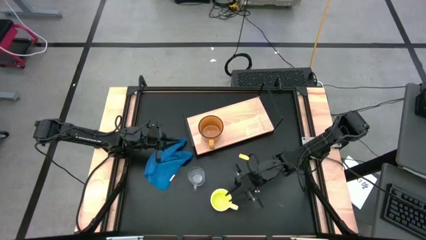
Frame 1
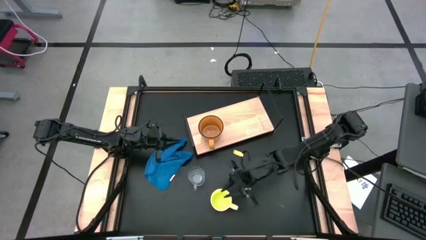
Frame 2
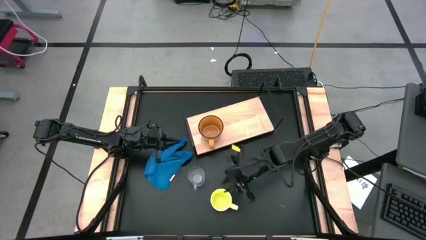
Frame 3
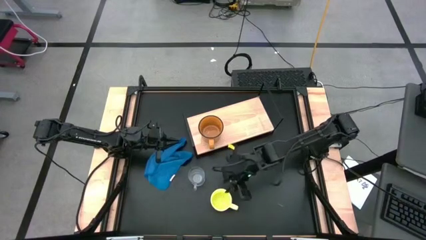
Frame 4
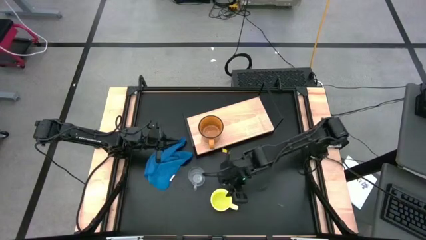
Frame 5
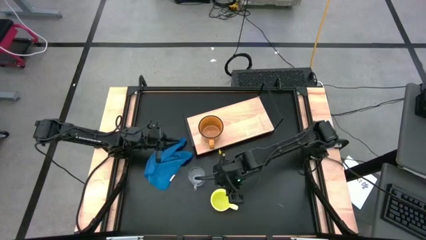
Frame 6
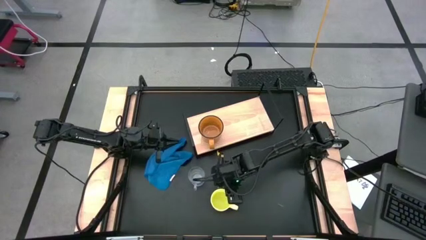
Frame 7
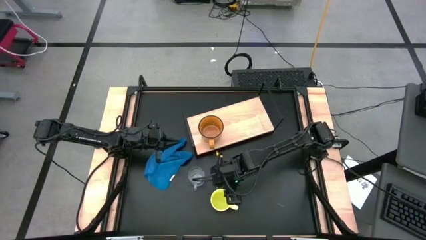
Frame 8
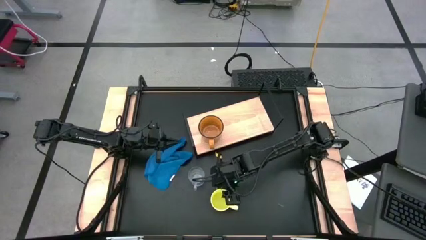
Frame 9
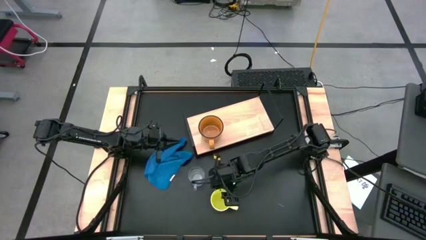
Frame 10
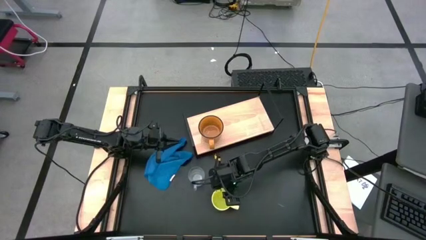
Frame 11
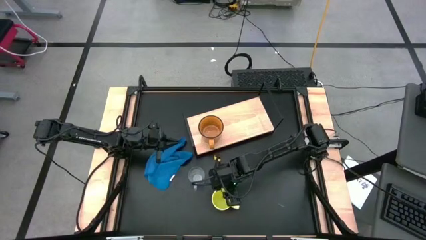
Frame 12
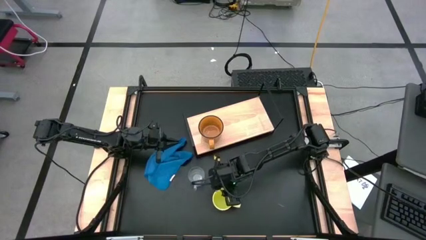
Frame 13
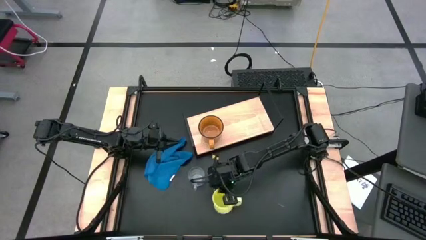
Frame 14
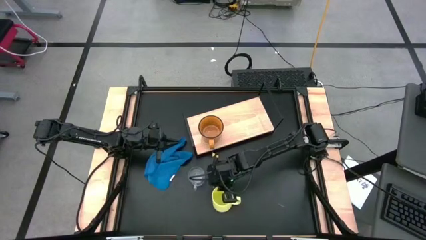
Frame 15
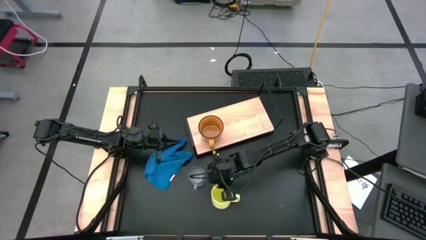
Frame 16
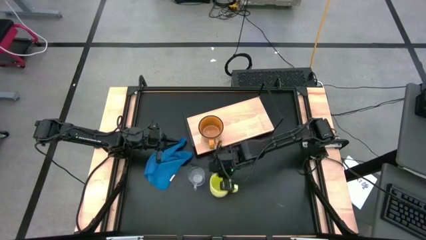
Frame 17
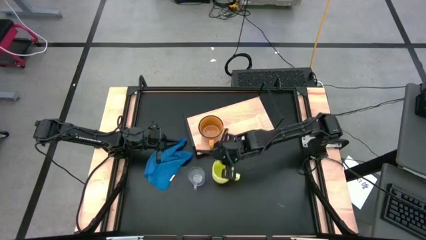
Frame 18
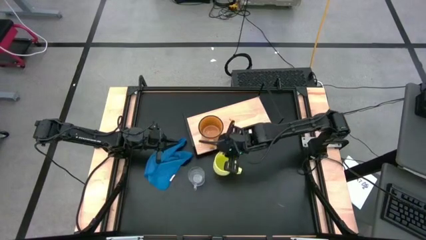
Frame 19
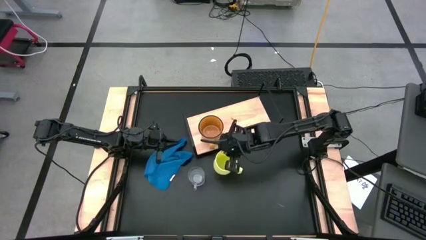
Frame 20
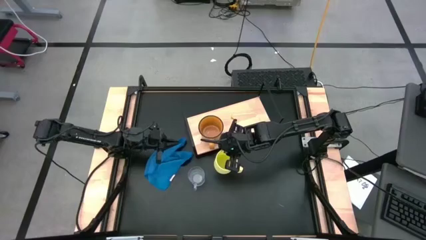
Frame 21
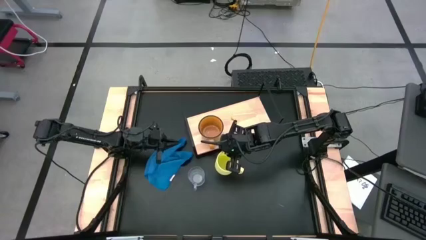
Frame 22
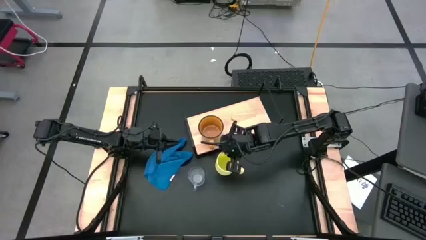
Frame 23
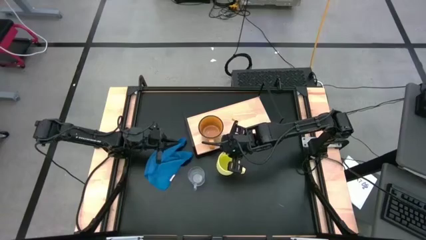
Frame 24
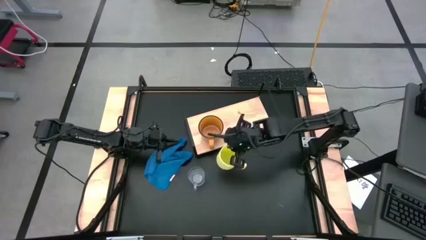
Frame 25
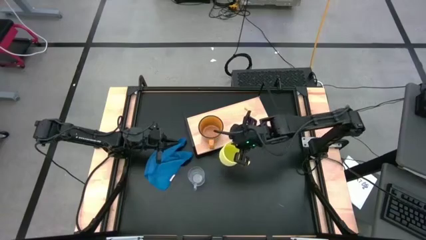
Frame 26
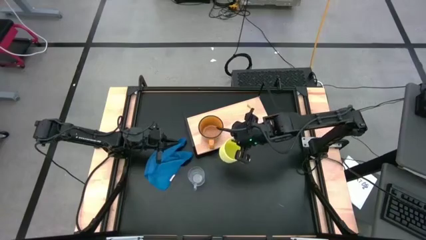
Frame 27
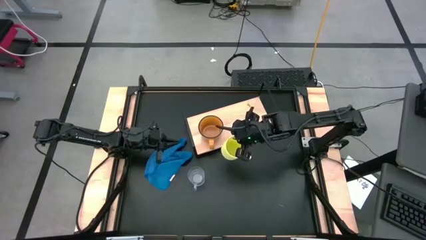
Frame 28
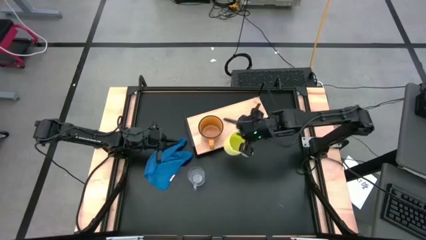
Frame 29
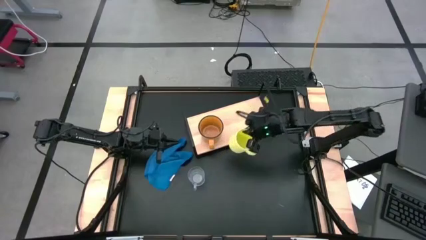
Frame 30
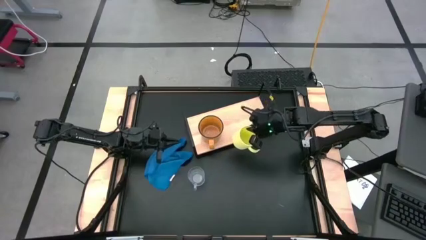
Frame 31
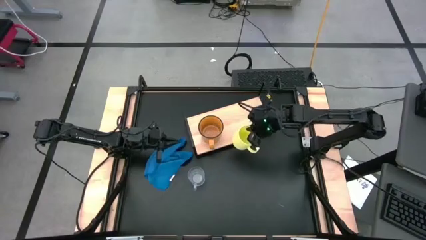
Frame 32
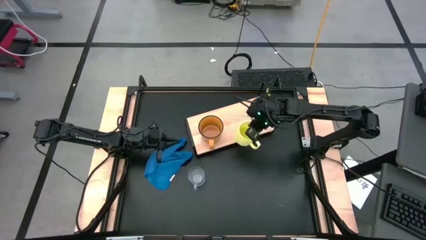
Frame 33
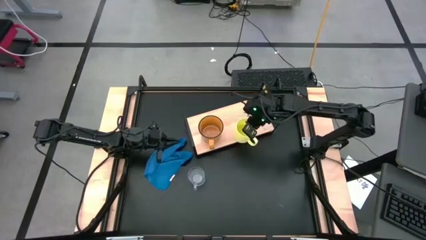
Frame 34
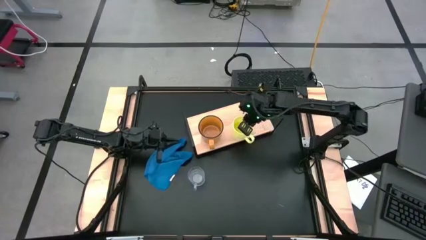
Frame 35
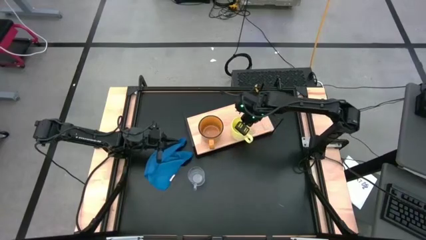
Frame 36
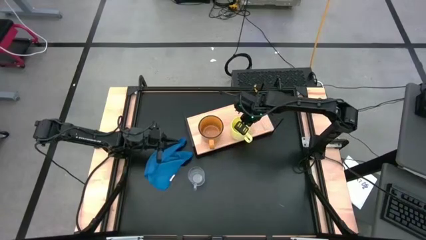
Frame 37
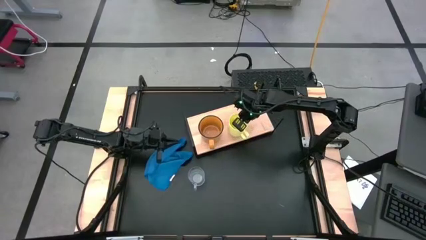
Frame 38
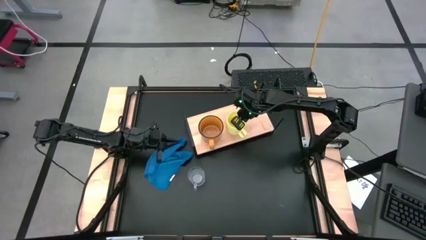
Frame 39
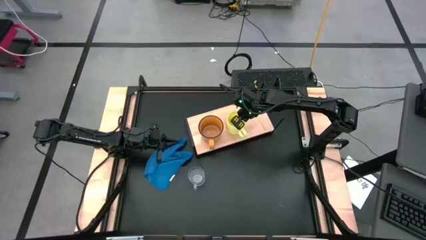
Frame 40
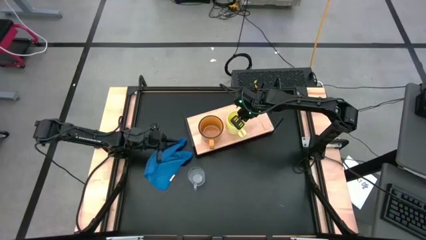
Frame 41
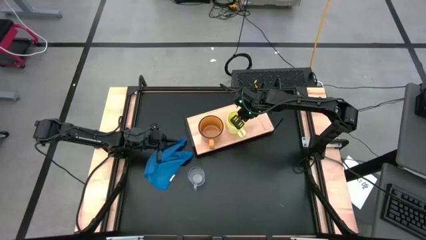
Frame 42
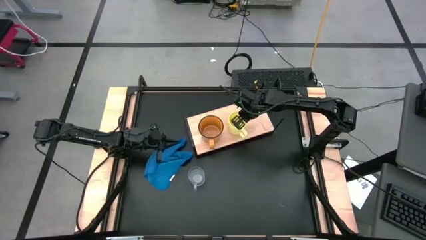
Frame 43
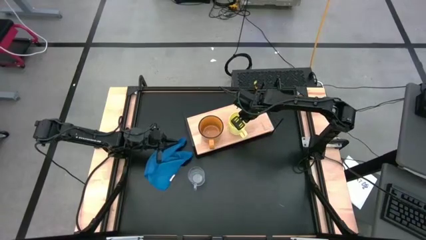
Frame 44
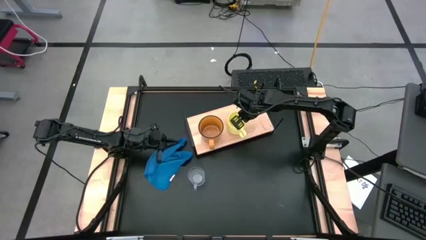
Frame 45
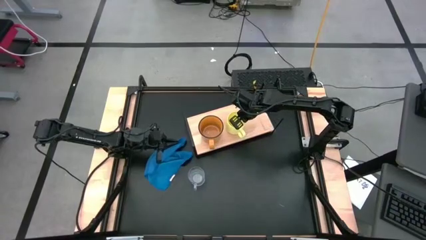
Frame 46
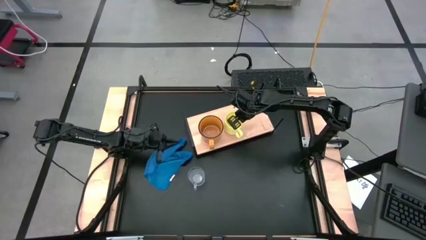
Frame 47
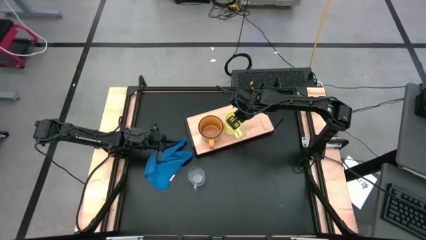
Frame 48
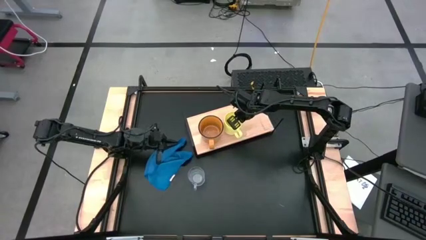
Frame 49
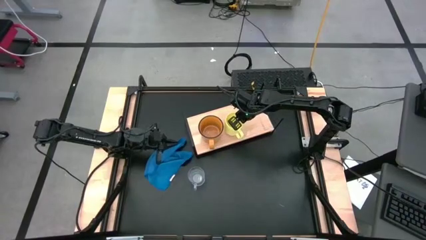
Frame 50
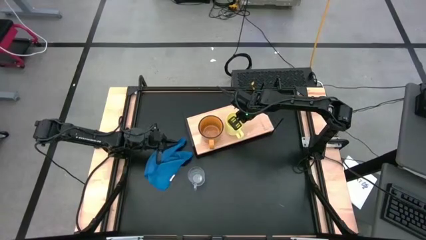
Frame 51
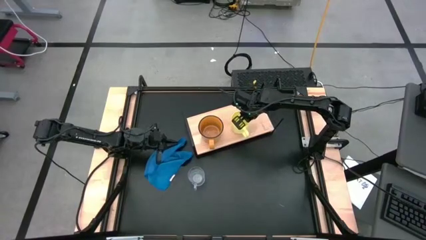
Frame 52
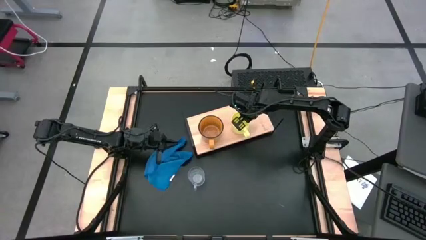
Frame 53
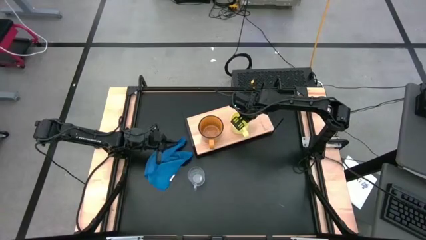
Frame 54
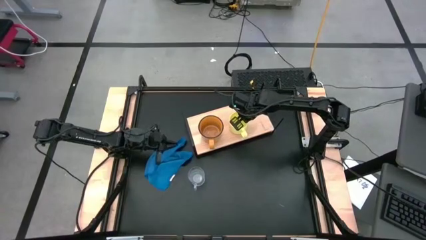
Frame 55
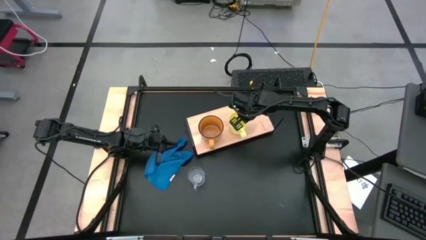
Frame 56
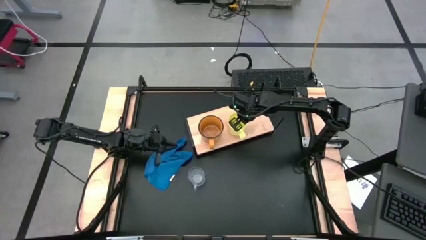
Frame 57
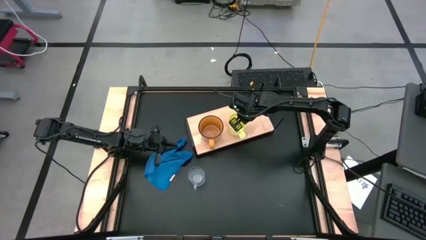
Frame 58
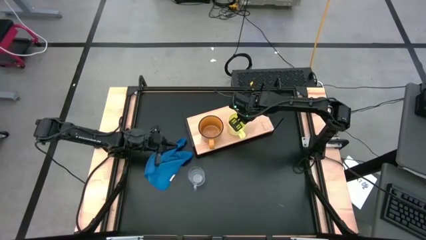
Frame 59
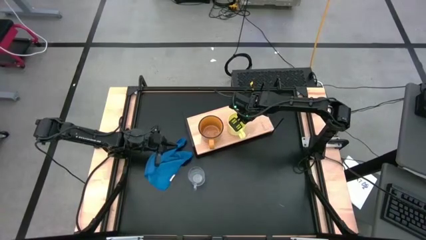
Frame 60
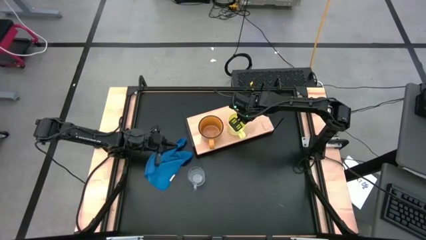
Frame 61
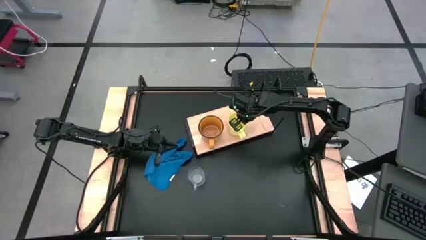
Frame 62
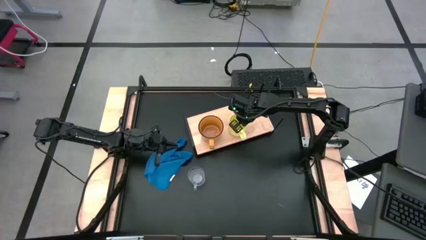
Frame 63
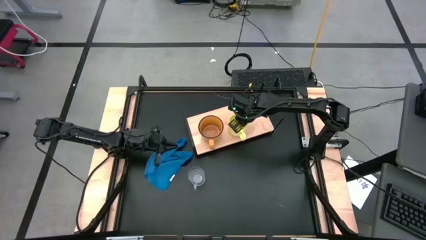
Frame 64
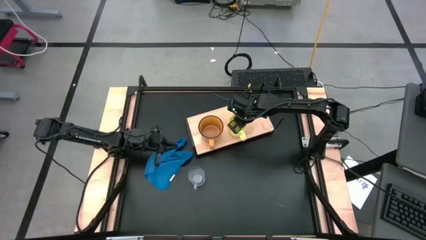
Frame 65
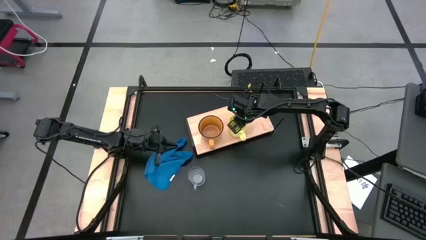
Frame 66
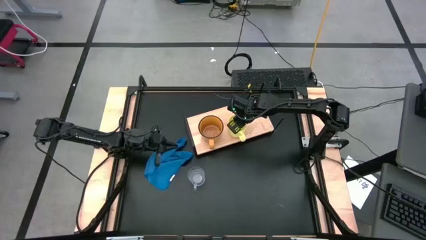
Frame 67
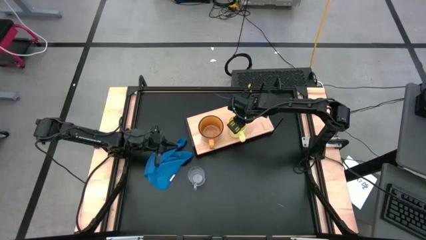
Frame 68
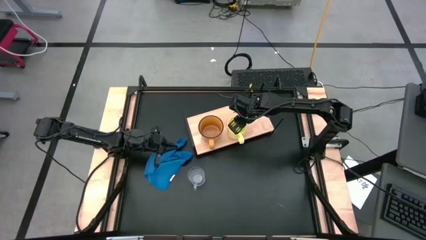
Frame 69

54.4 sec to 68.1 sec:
Task: Stack small to large cups/mugs on shelf
Put the yellow mug on the shelf

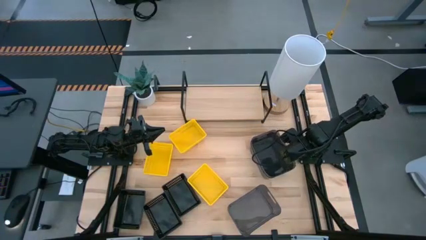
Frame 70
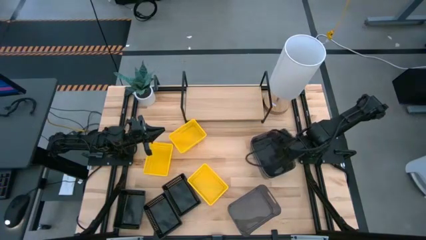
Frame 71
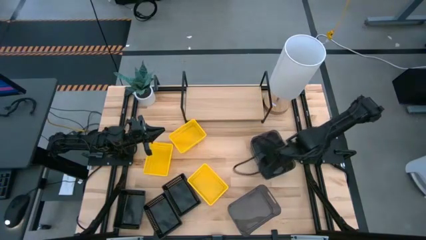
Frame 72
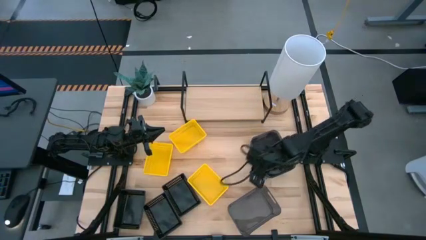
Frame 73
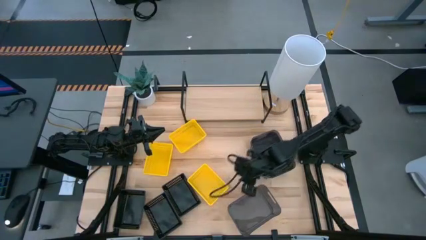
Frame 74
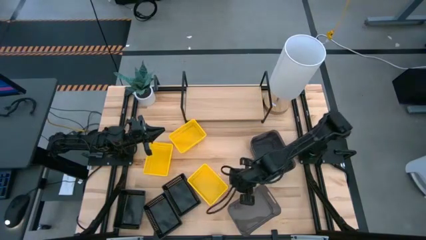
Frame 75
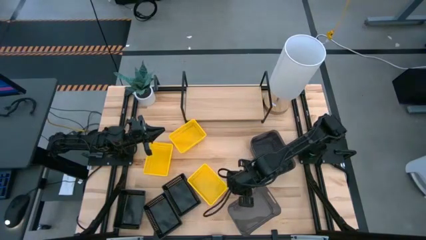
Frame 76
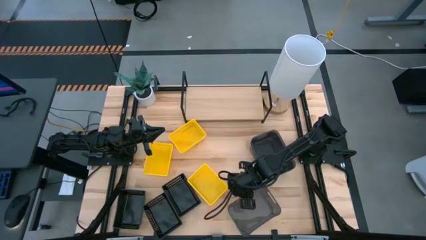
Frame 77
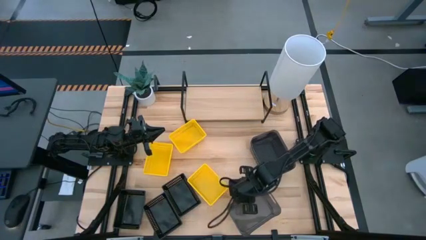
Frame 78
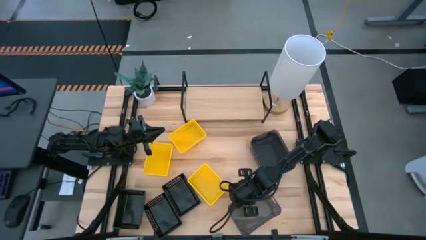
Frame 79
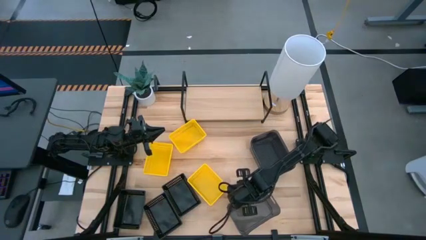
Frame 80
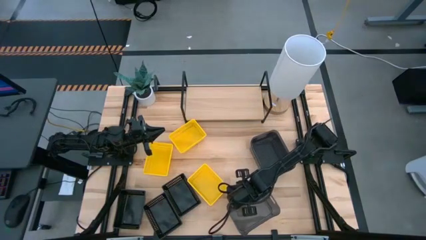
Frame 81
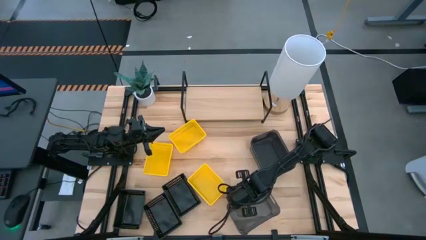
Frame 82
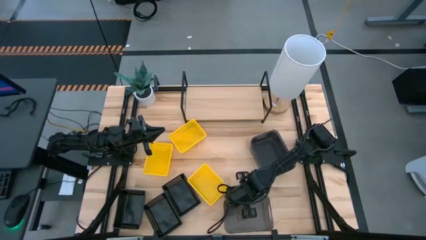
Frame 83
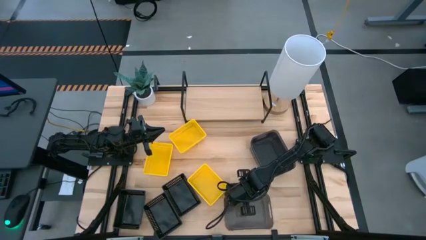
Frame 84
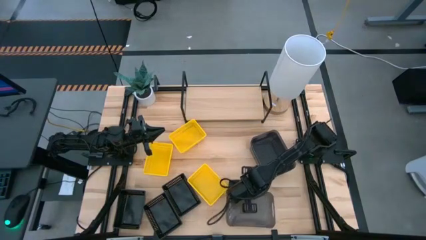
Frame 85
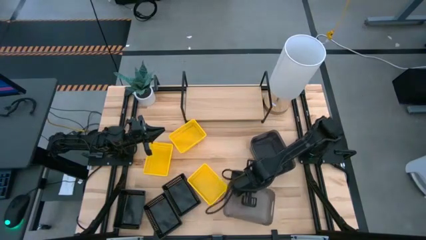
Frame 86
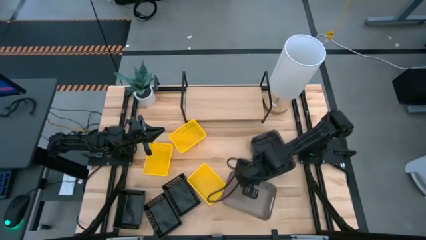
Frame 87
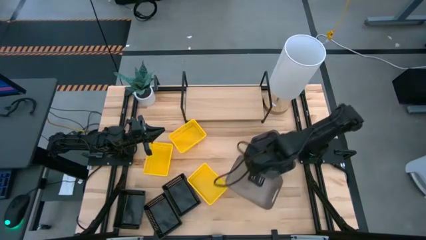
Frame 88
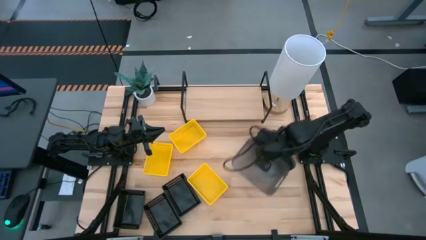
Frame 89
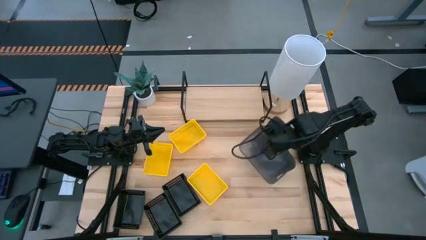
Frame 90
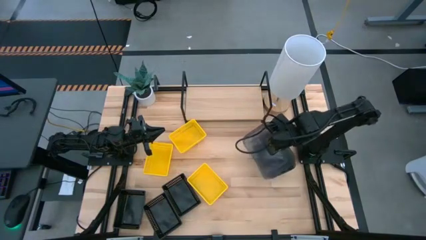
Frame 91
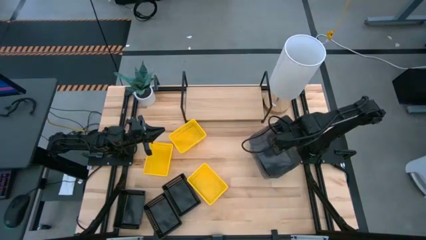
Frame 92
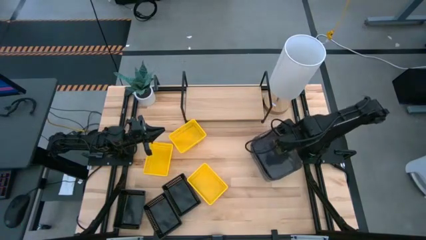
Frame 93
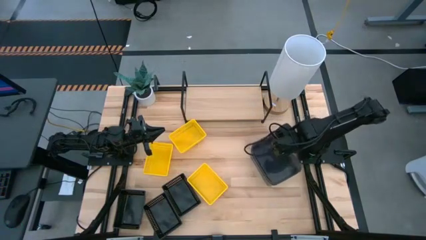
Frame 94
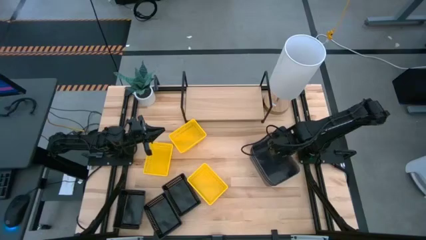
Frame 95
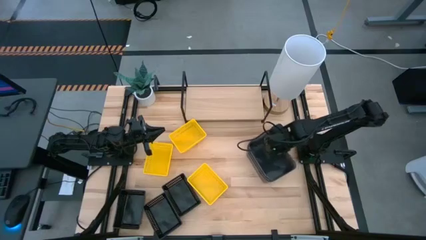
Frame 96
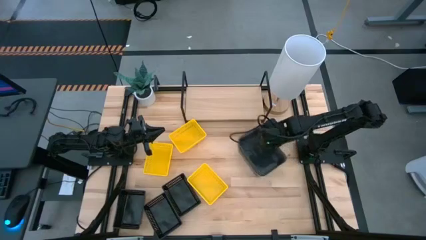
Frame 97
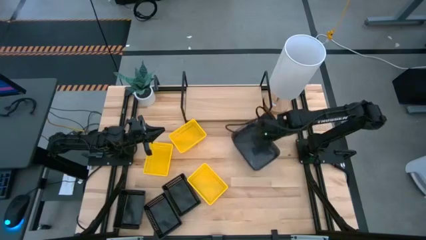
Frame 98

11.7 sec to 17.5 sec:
Task: Stack baskets on shelf by color
Stack the lower right gray bin into the bottom right gray bin
